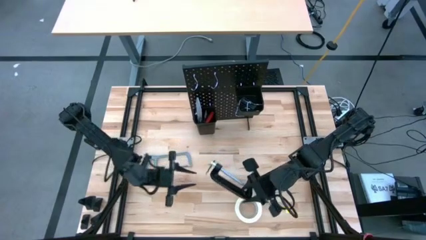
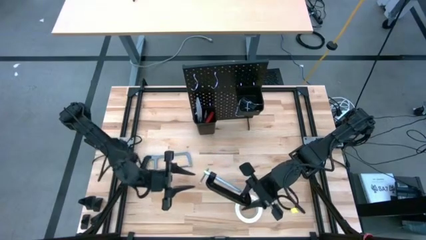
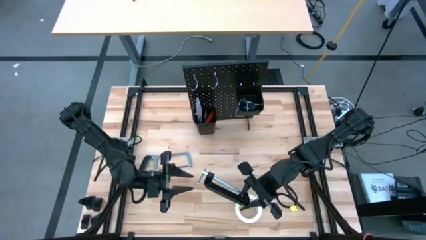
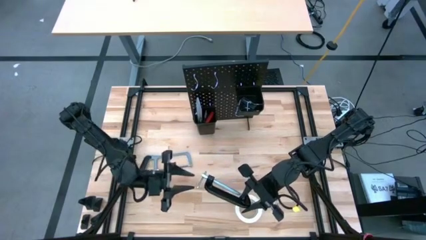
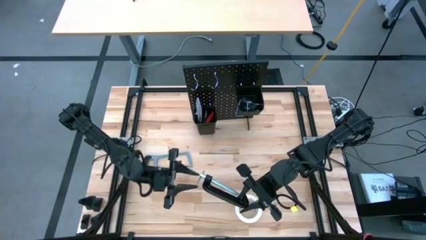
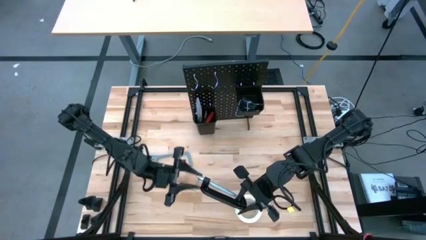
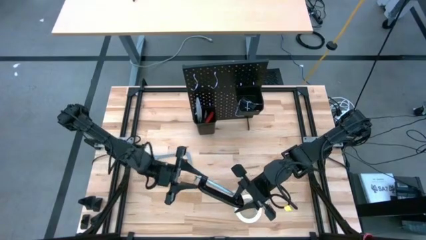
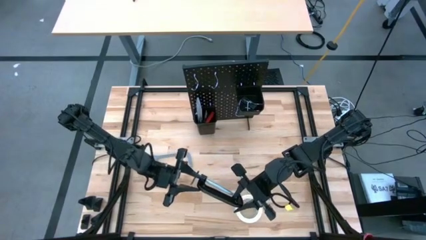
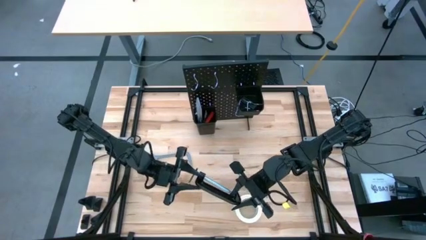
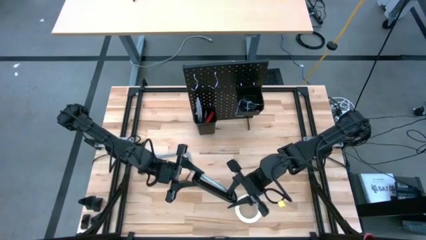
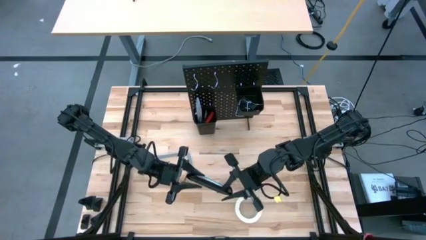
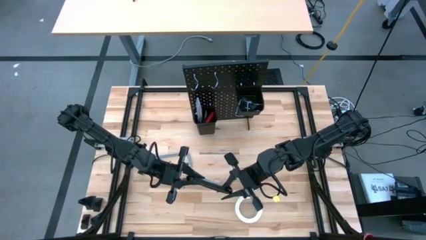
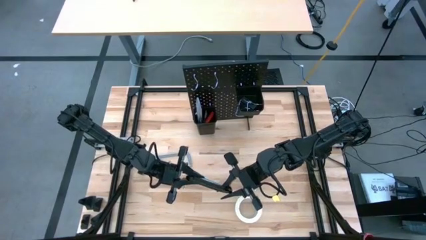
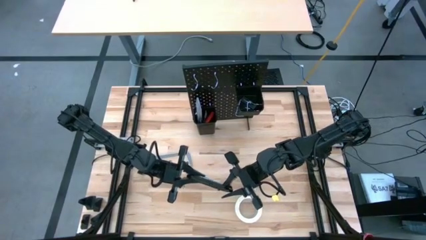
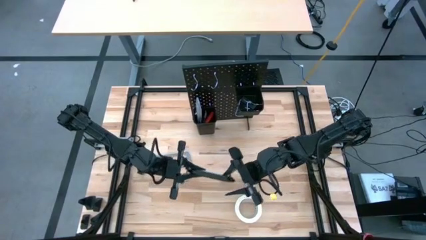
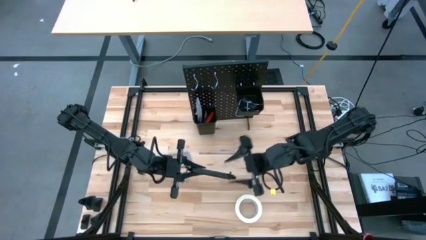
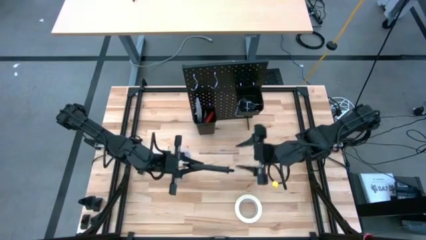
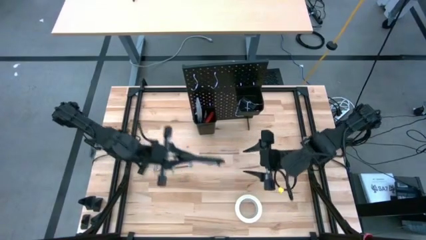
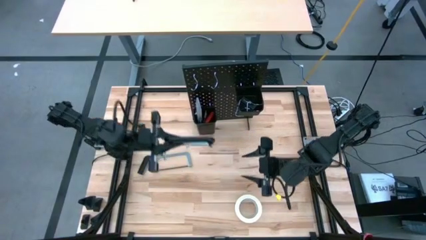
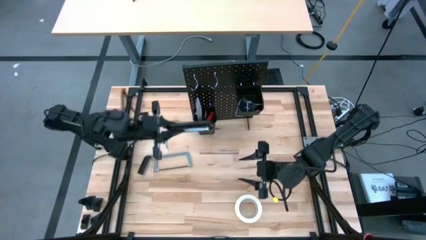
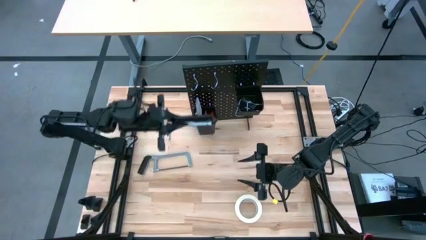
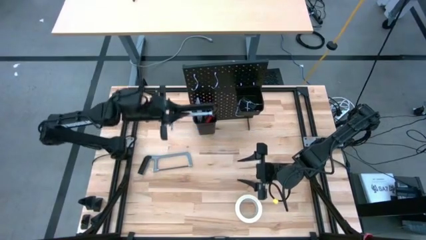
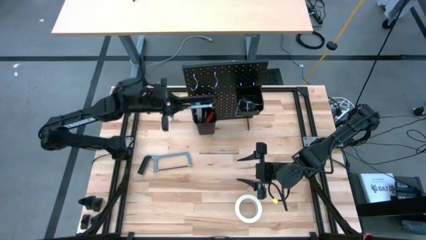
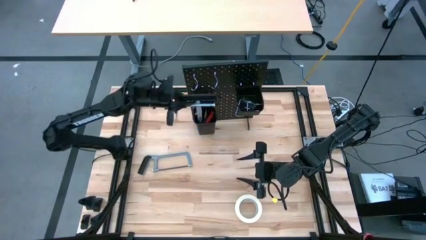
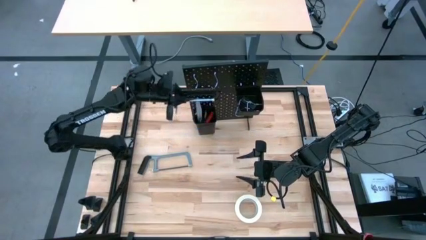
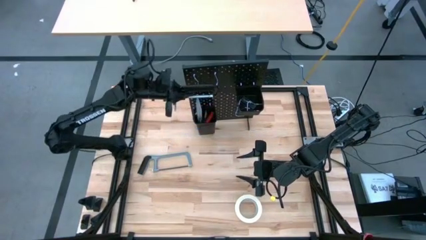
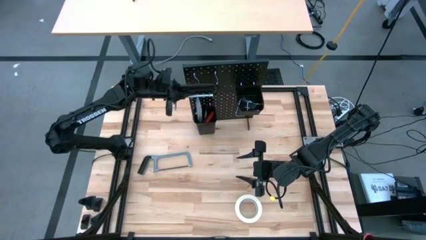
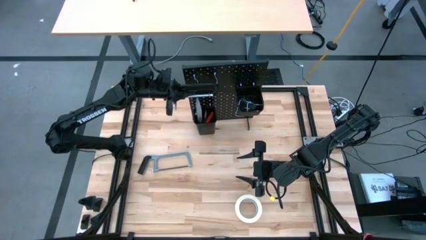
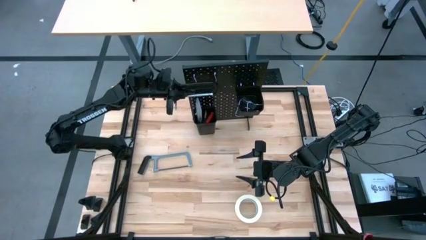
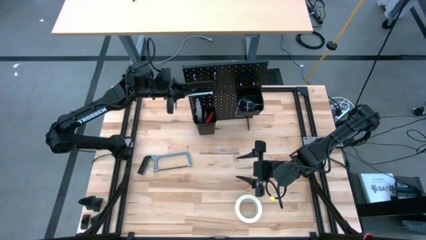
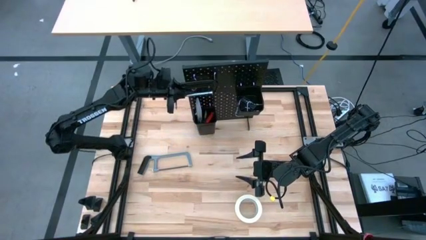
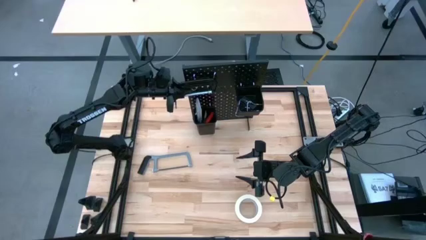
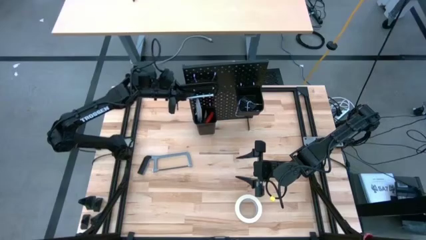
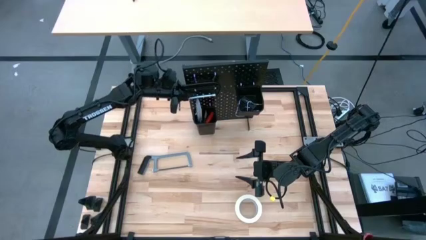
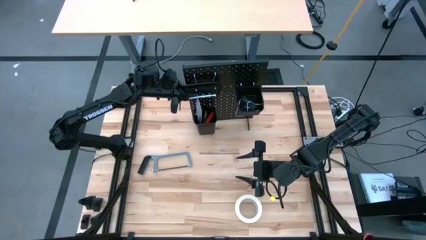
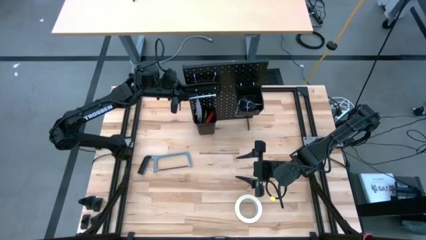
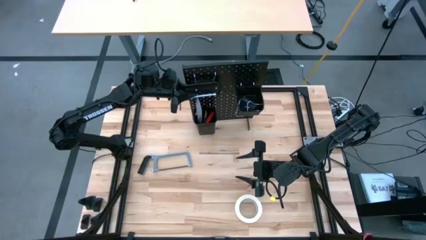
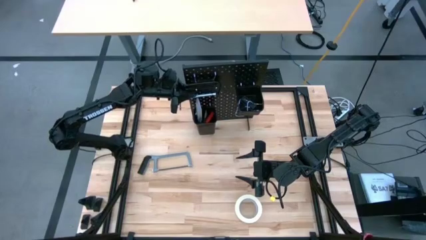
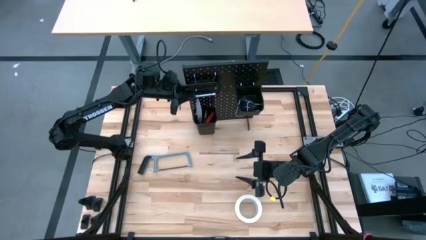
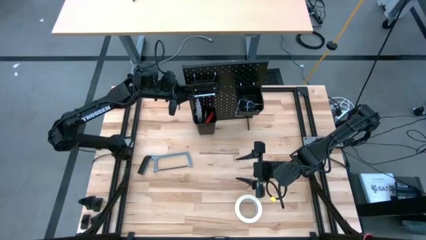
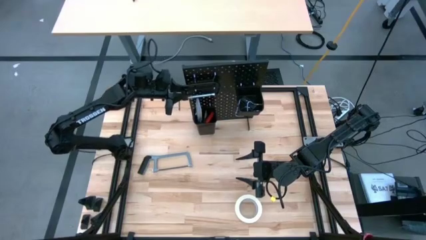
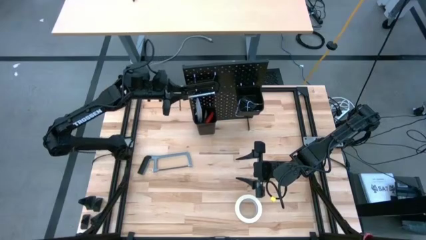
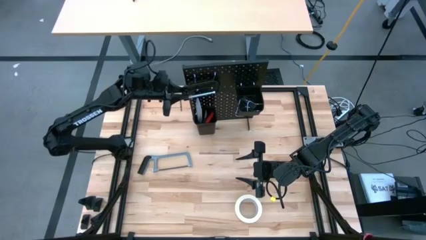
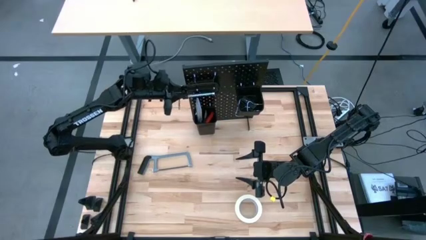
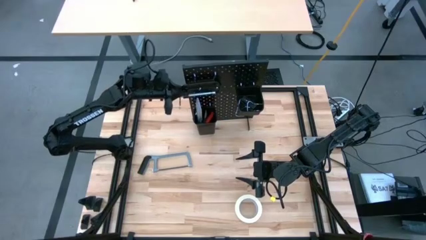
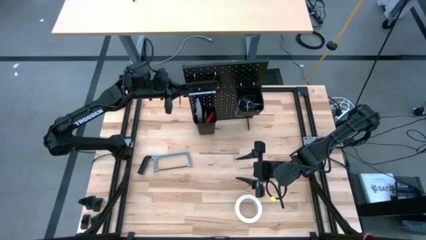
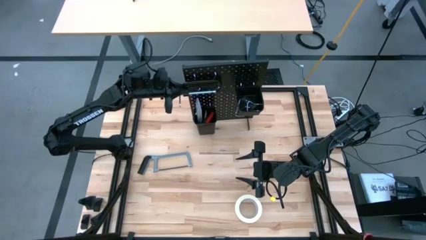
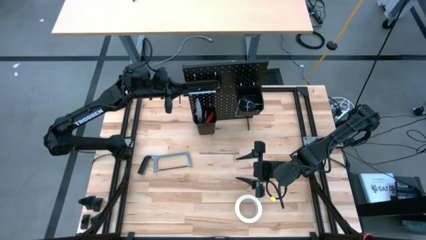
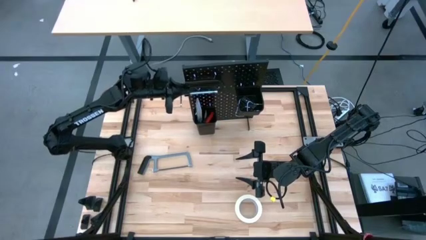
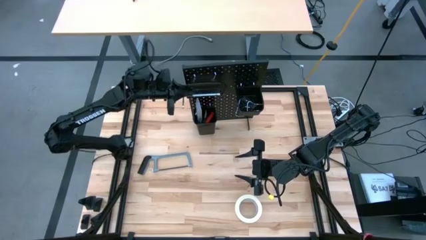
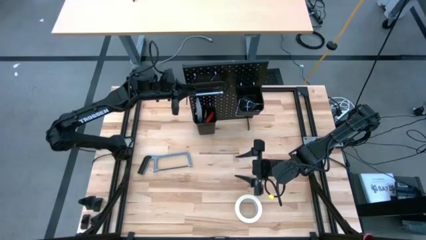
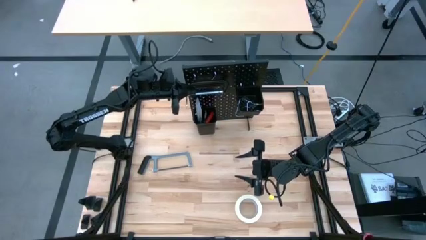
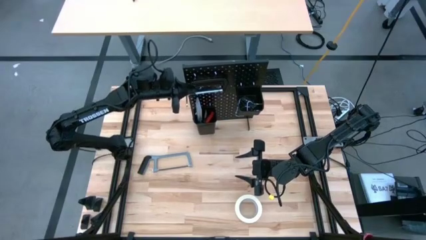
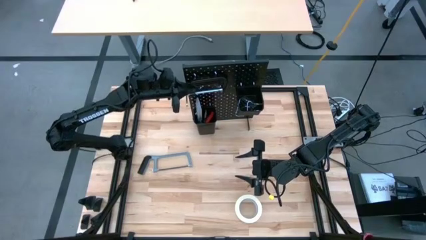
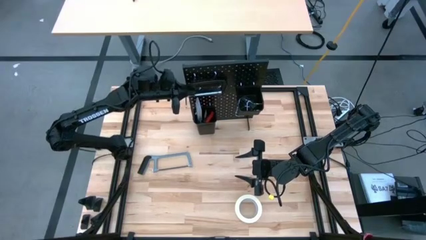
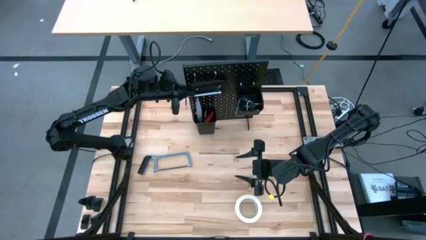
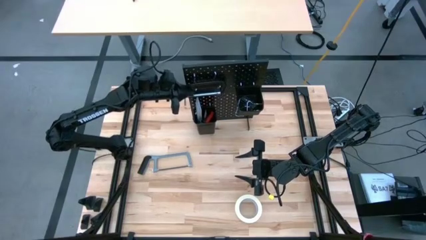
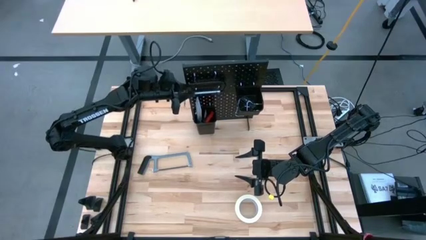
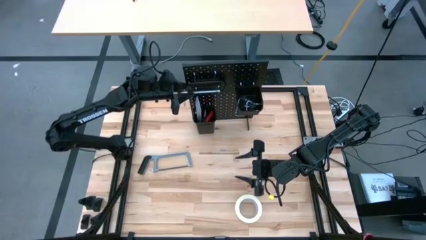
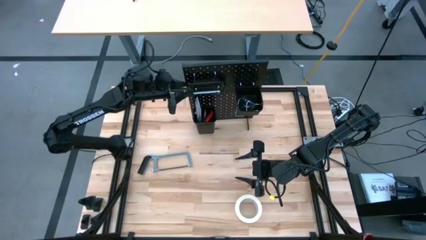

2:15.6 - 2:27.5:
Task: Hang tools onto peg board
Hang the clamp on the pegboard
